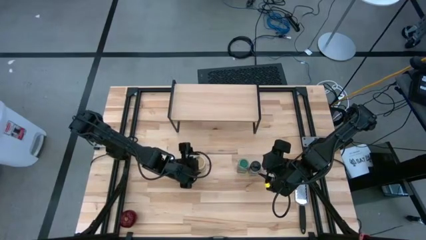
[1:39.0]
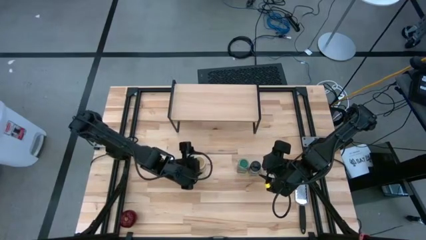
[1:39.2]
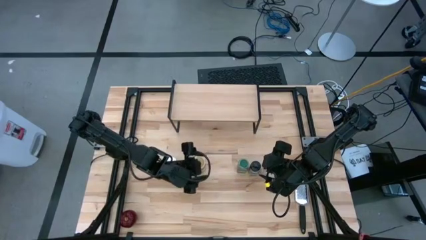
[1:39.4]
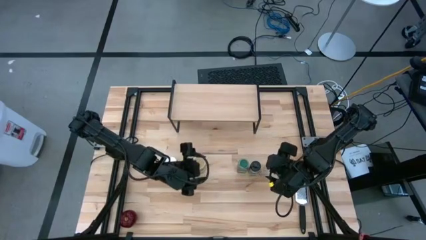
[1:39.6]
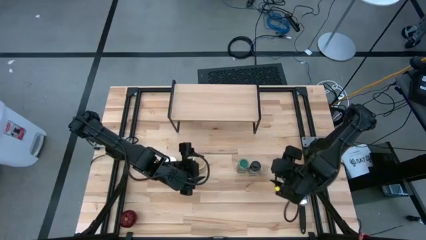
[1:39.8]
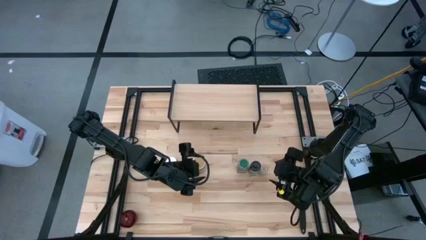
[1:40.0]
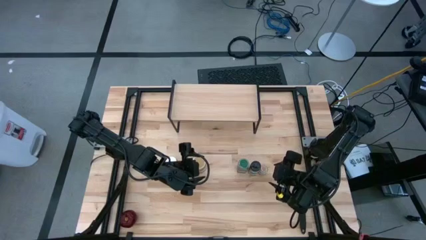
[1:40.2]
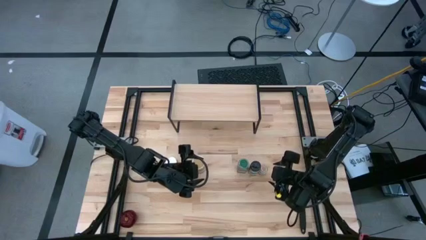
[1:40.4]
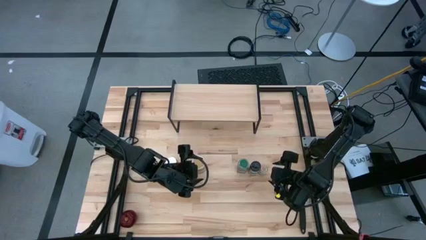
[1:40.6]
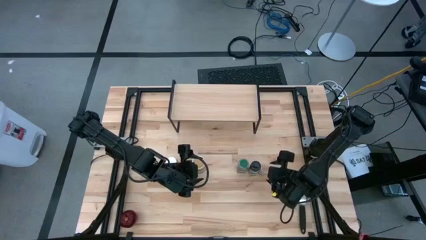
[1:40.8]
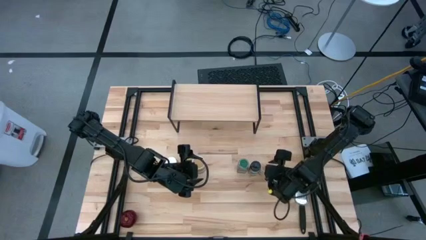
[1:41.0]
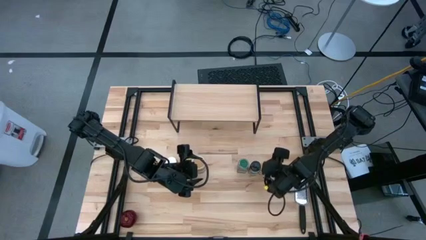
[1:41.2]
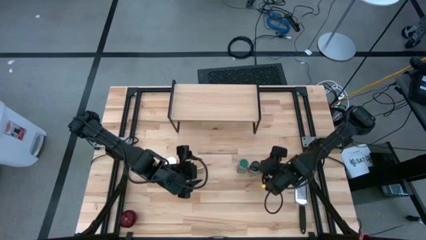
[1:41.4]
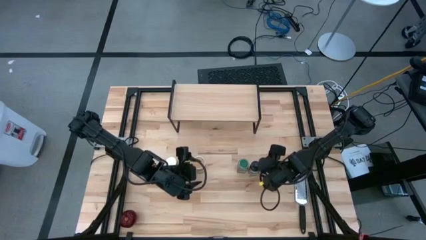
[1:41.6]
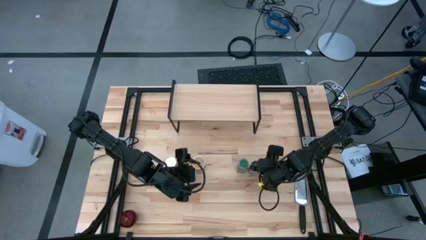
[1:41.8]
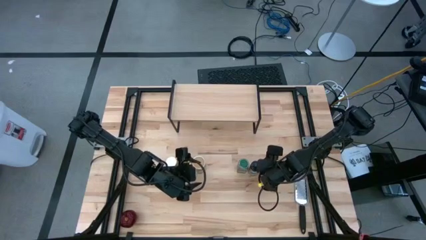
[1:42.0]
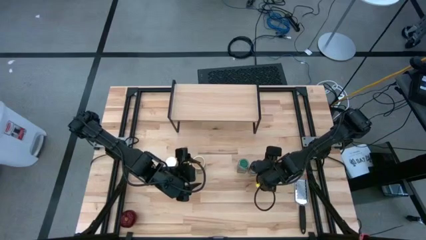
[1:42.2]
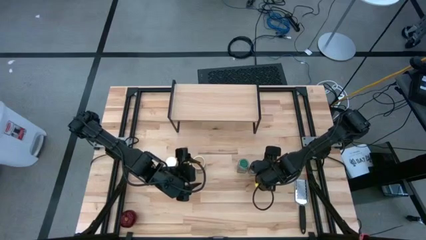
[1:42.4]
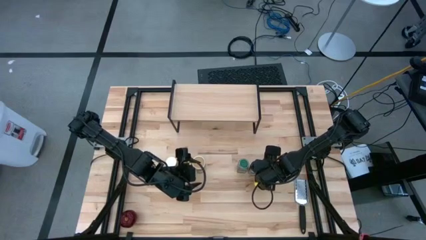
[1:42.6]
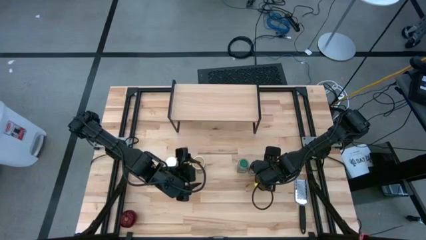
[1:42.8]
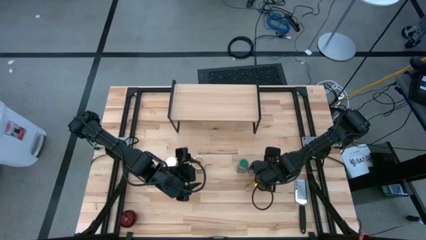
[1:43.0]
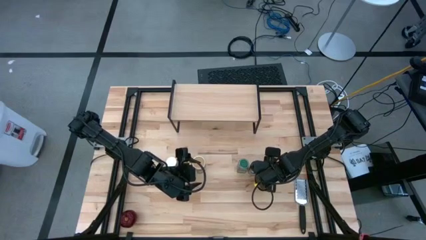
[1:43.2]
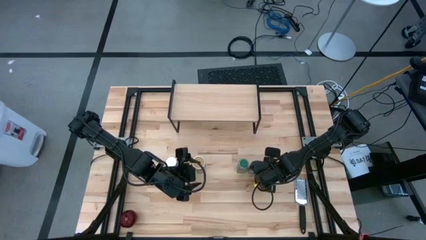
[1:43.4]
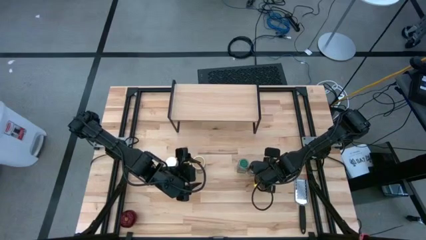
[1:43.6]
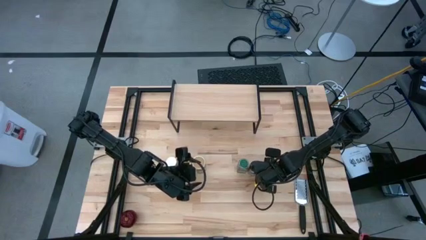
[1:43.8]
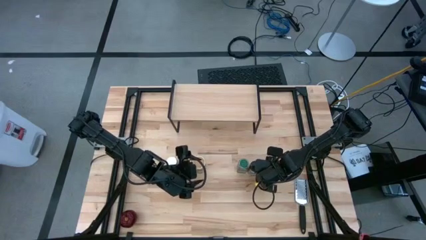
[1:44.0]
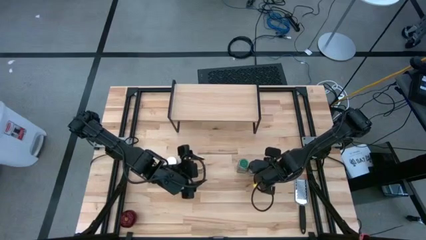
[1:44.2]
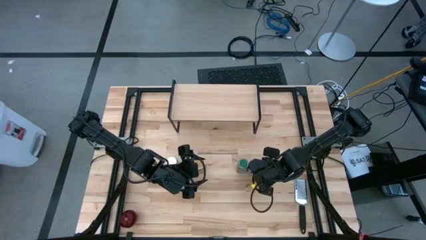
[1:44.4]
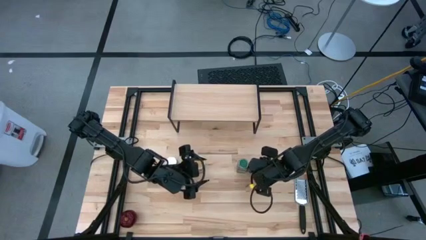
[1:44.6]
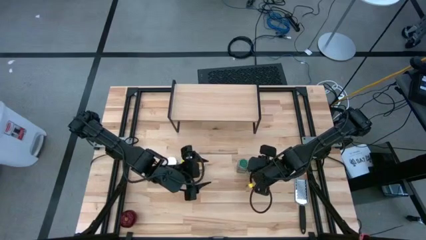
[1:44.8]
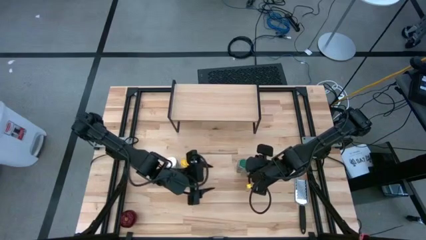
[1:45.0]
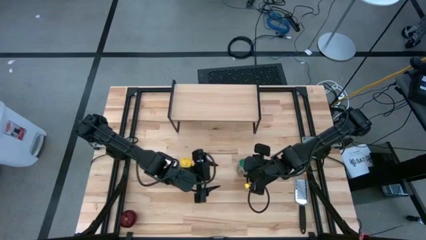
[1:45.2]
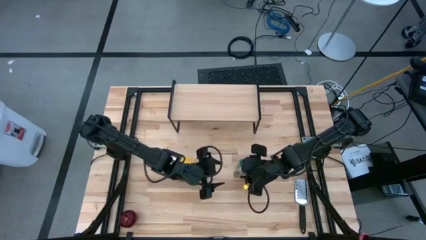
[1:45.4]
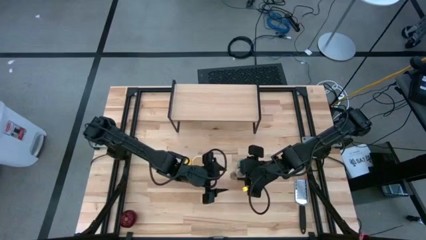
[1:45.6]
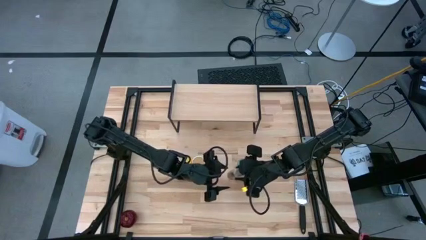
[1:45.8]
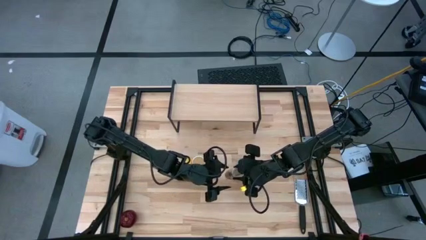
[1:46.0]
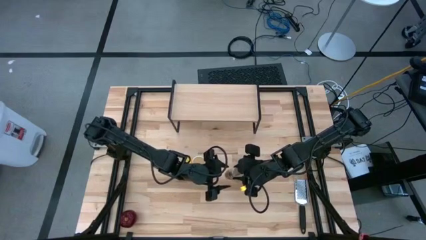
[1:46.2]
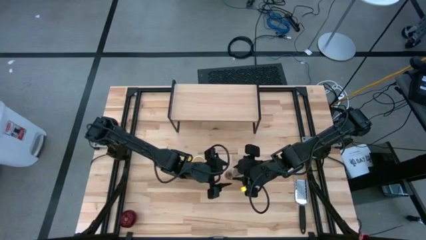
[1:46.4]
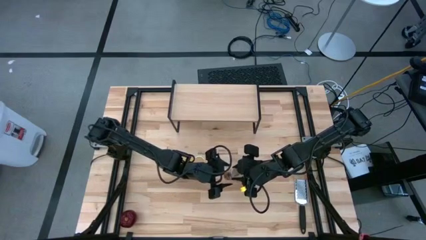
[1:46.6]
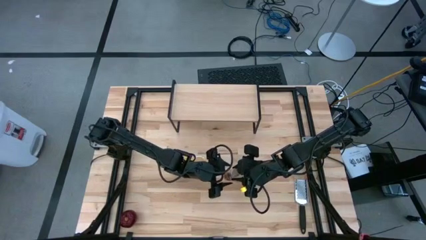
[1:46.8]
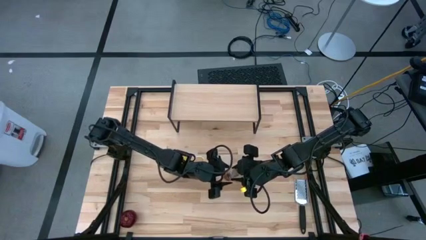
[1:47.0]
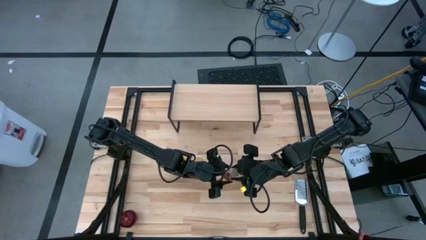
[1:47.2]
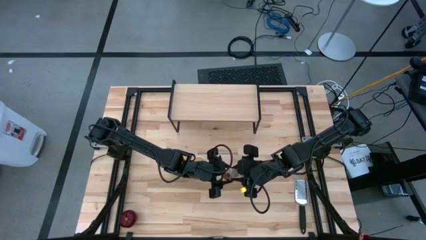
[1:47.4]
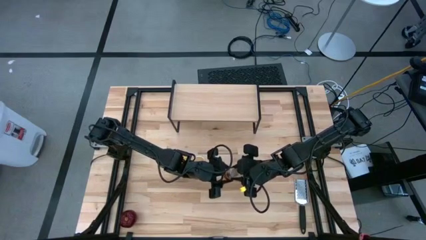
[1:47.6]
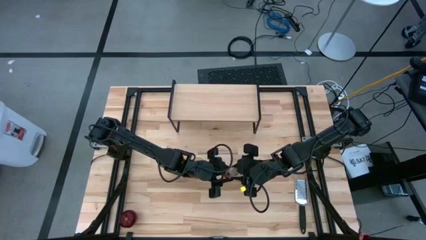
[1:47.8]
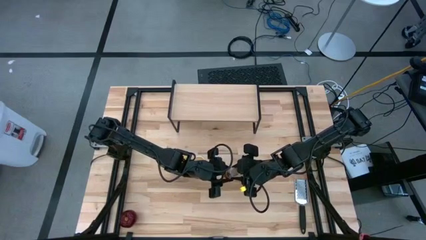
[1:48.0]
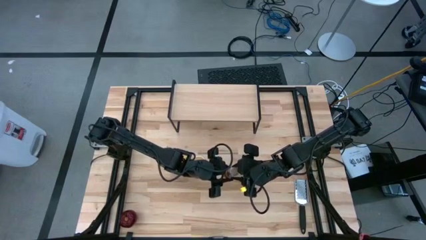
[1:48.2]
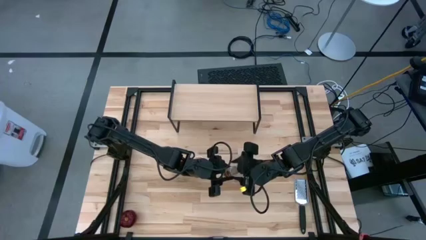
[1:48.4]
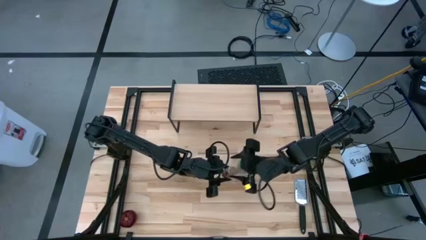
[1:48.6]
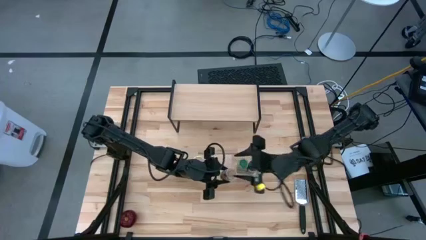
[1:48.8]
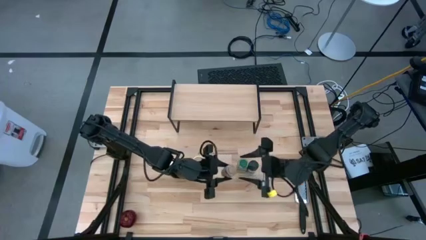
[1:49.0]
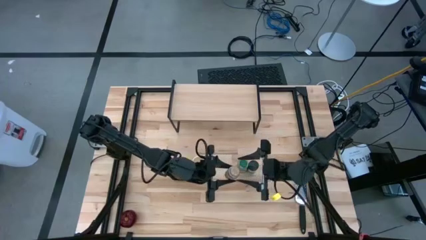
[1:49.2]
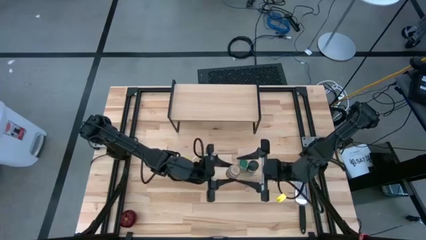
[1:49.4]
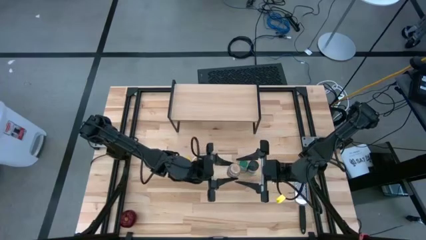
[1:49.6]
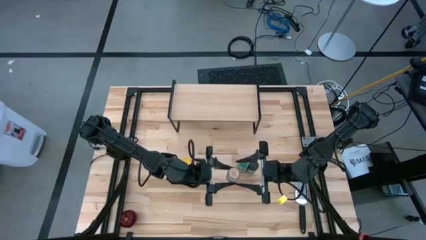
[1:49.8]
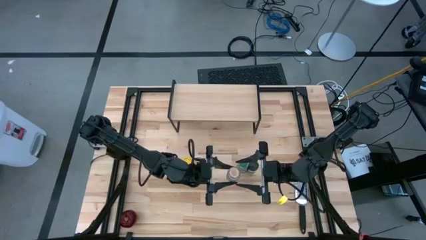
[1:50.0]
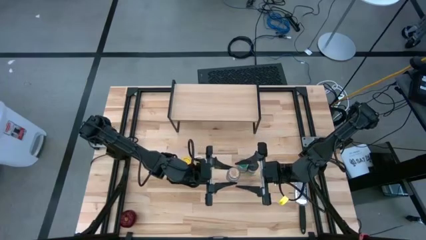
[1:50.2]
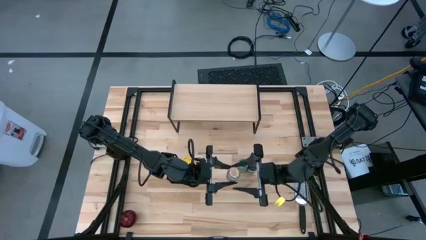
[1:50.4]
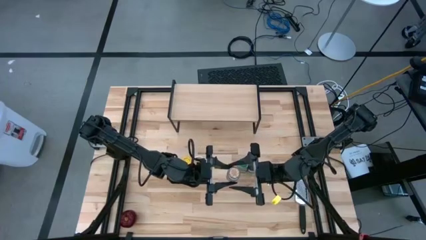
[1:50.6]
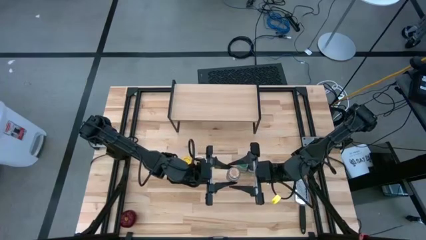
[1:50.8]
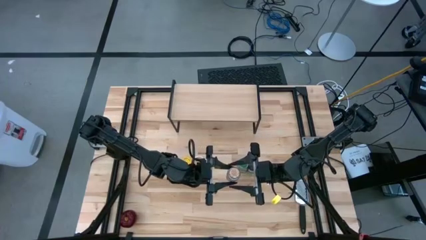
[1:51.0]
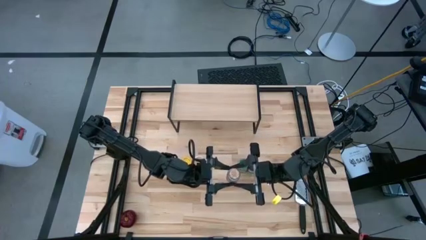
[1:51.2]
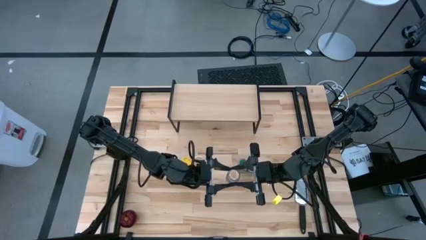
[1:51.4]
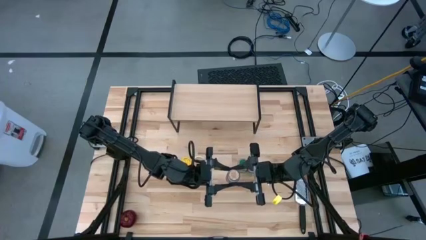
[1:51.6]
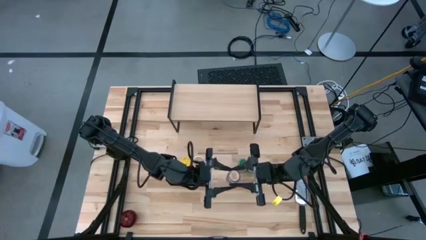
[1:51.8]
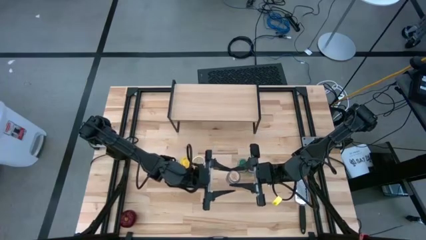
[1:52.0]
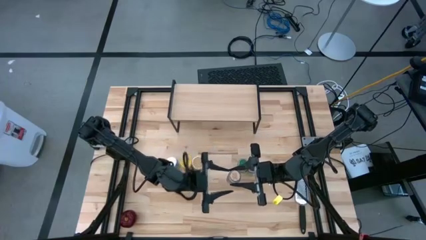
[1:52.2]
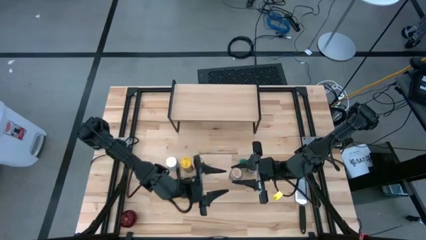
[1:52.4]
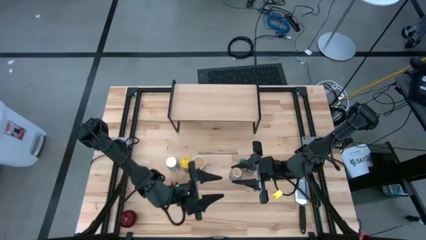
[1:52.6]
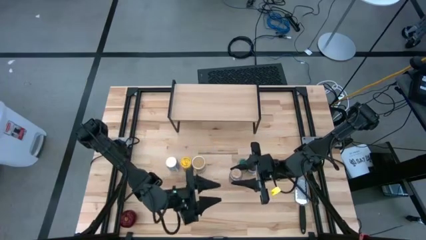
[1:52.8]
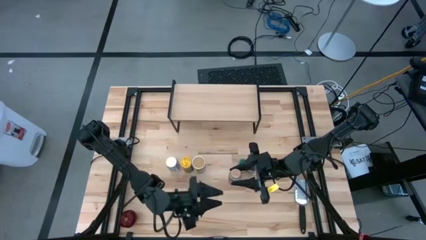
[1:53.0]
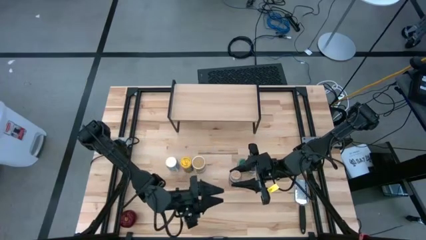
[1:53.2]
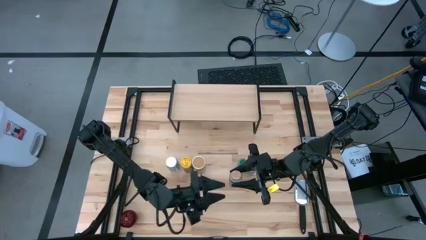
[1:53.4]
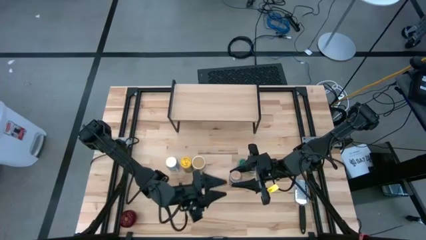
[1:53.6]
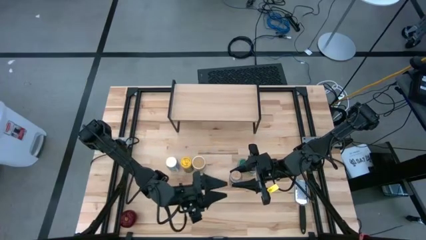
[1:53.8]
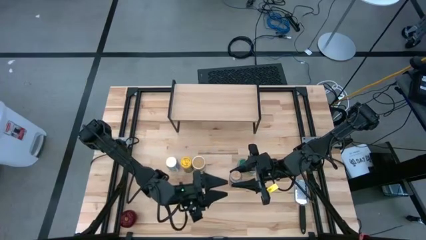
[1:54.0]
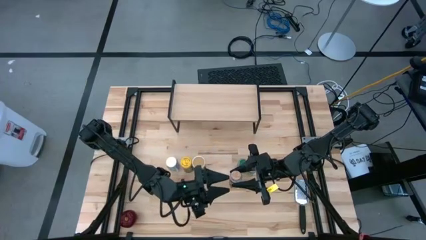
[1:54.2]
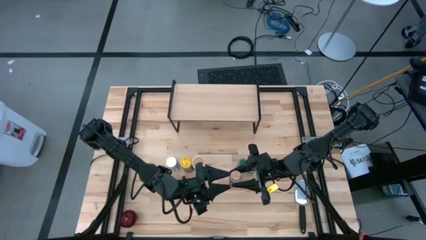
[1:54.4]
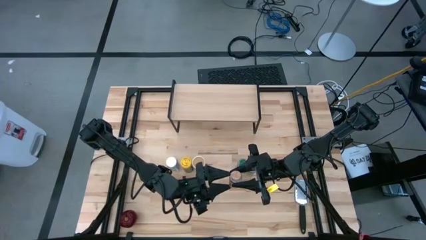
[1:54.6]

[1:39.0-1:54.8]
Task: Shelf spices
Put the transparent seasoning bottle on the shelf
